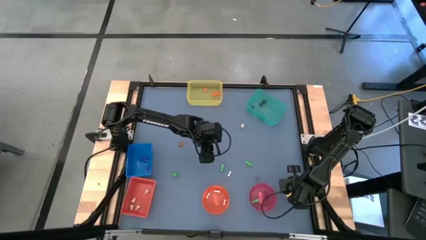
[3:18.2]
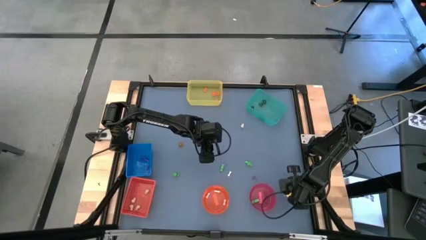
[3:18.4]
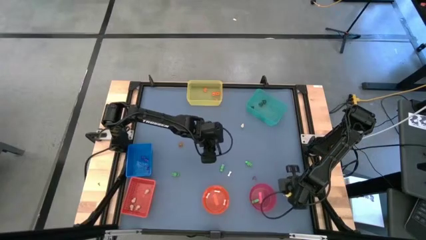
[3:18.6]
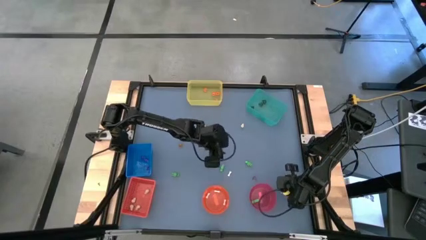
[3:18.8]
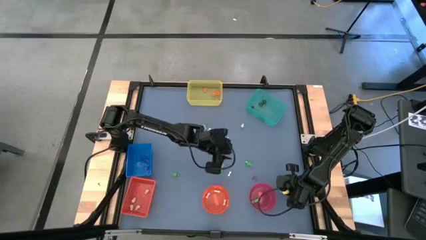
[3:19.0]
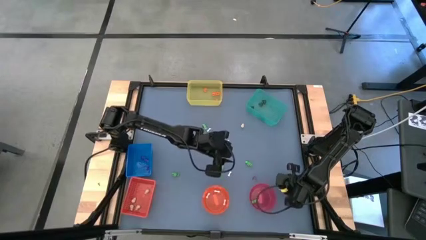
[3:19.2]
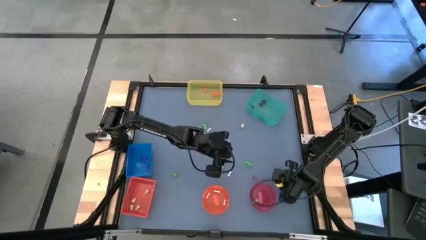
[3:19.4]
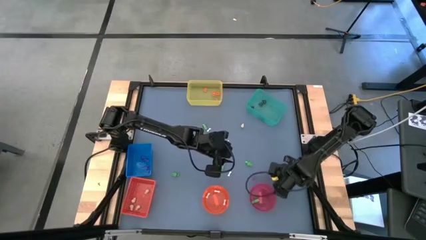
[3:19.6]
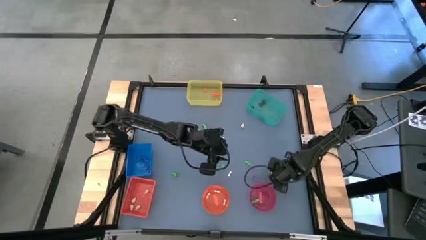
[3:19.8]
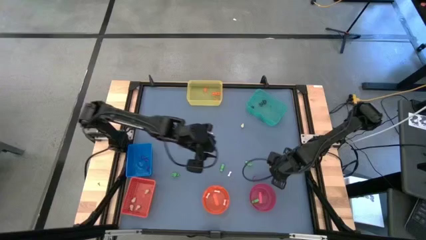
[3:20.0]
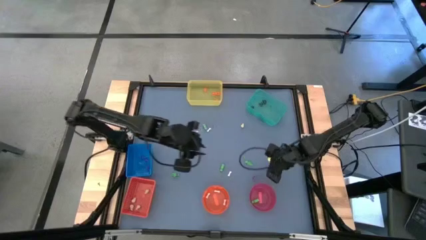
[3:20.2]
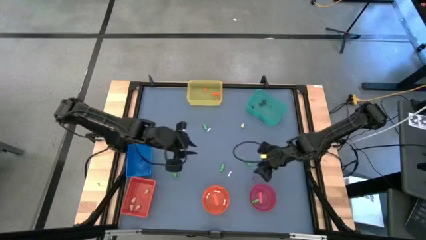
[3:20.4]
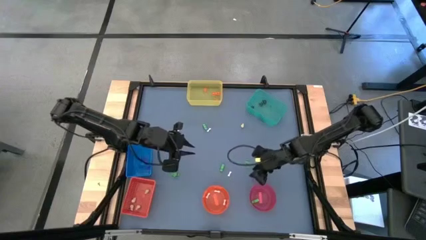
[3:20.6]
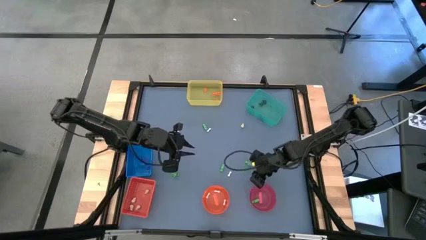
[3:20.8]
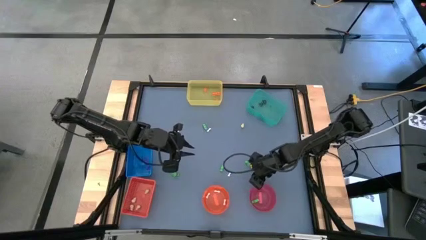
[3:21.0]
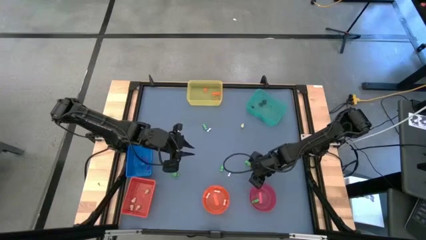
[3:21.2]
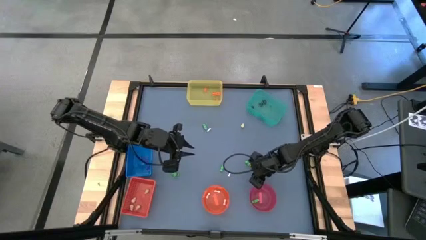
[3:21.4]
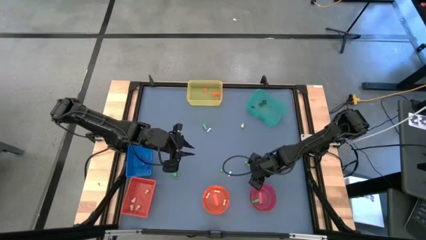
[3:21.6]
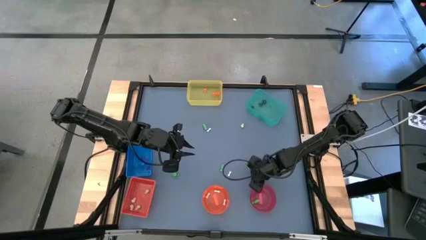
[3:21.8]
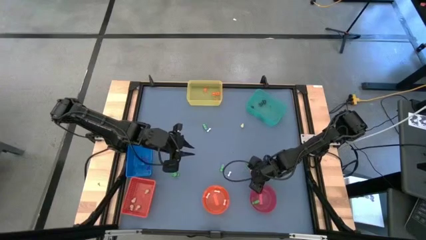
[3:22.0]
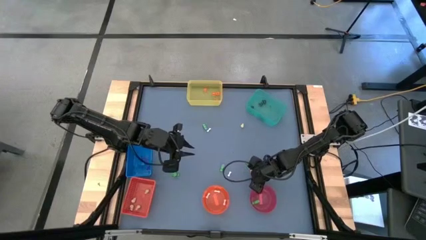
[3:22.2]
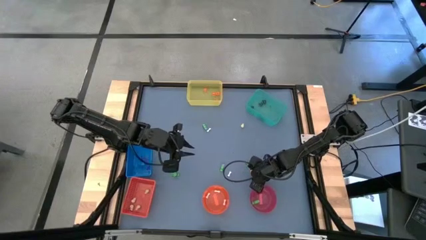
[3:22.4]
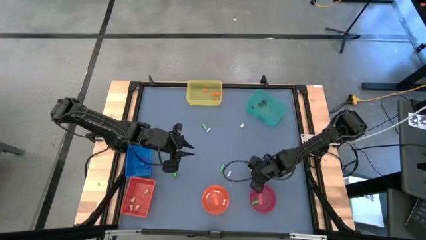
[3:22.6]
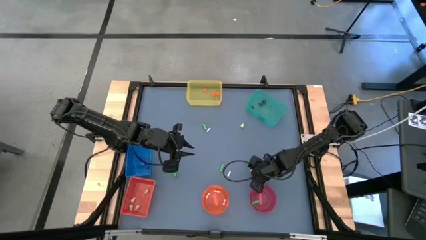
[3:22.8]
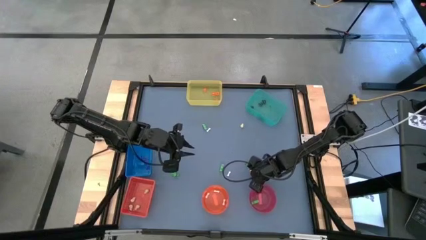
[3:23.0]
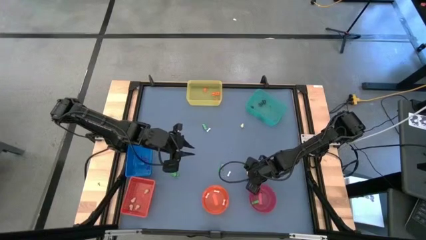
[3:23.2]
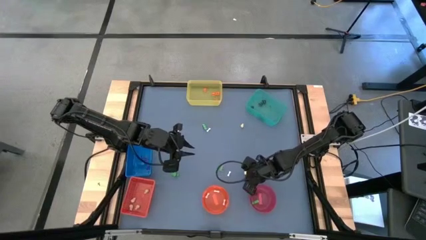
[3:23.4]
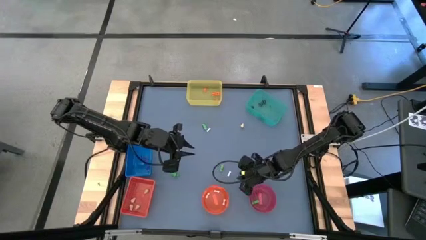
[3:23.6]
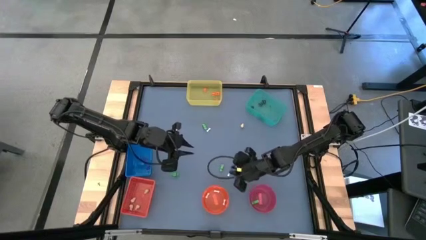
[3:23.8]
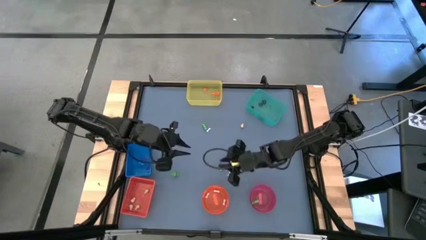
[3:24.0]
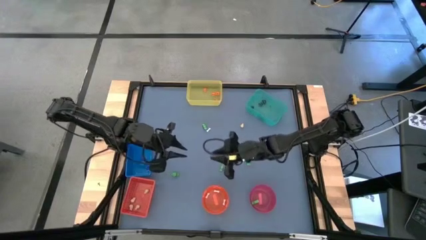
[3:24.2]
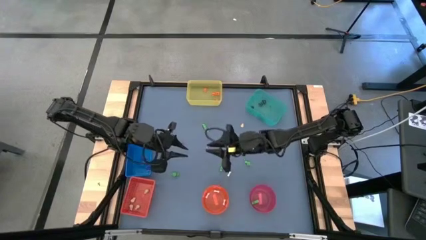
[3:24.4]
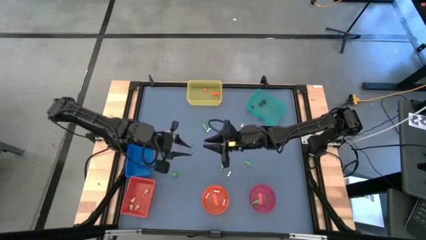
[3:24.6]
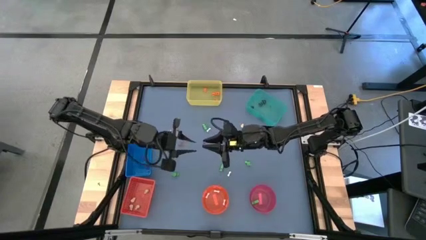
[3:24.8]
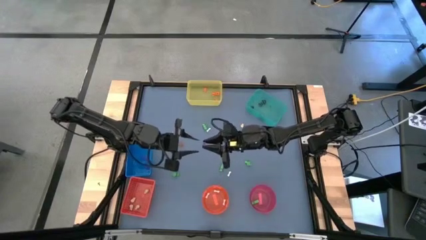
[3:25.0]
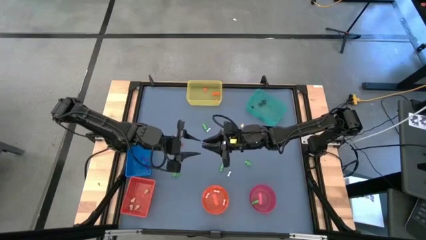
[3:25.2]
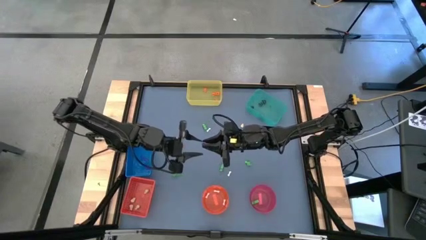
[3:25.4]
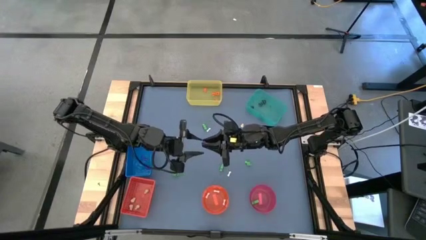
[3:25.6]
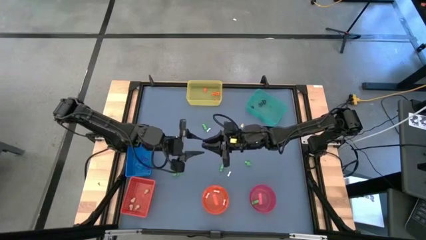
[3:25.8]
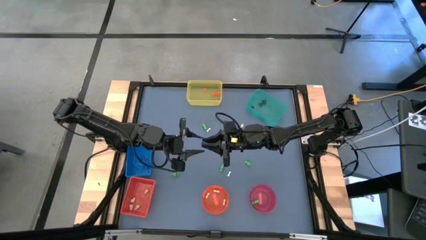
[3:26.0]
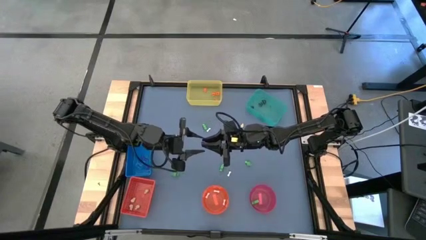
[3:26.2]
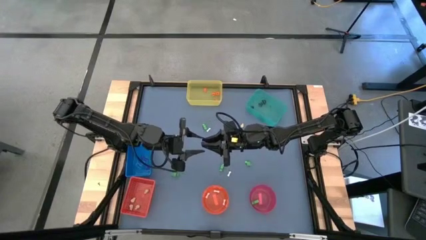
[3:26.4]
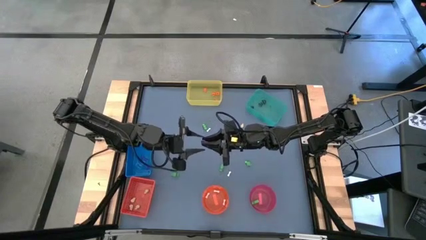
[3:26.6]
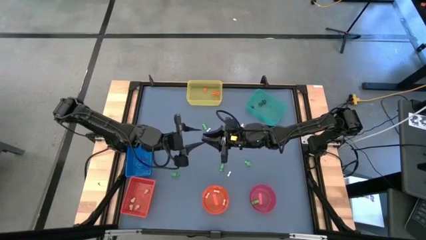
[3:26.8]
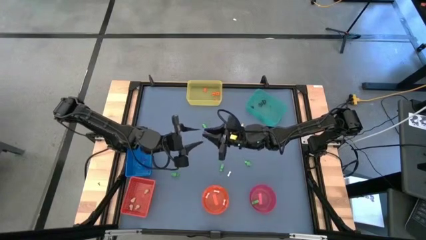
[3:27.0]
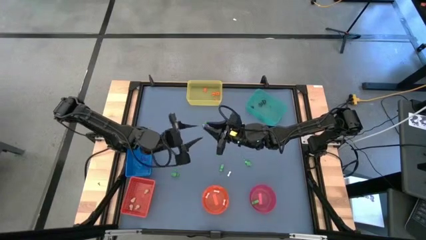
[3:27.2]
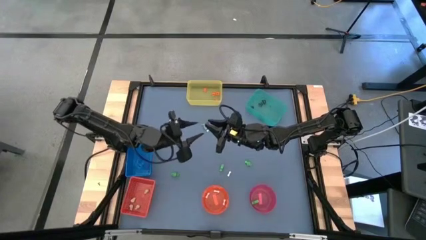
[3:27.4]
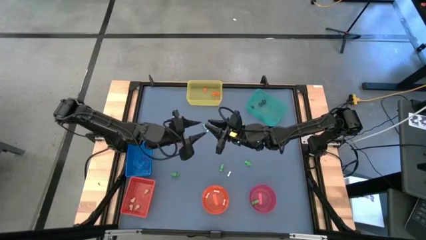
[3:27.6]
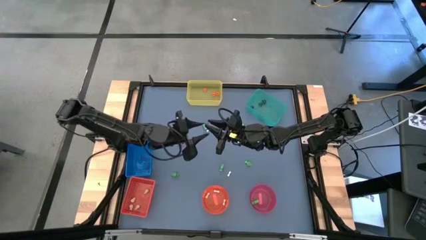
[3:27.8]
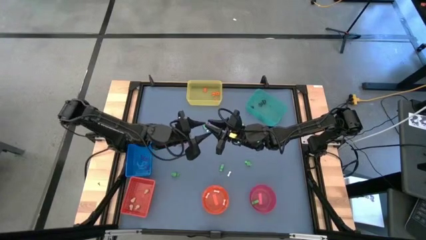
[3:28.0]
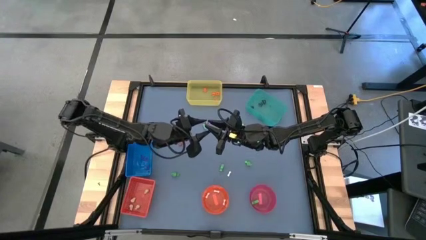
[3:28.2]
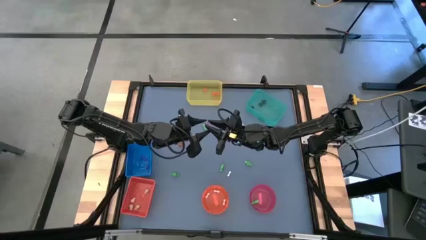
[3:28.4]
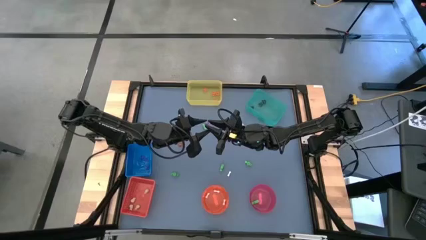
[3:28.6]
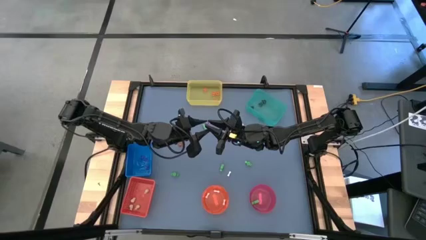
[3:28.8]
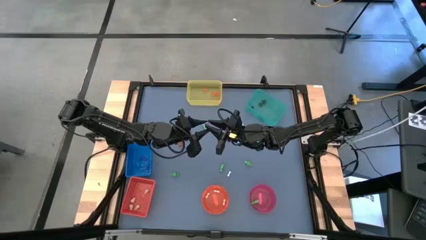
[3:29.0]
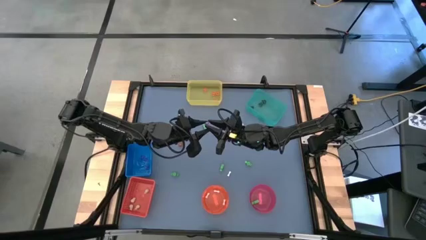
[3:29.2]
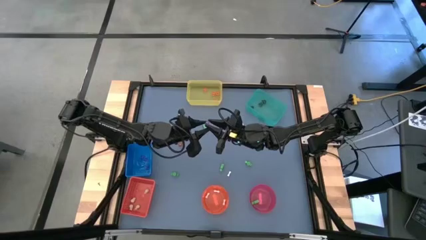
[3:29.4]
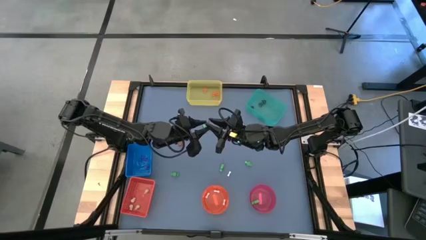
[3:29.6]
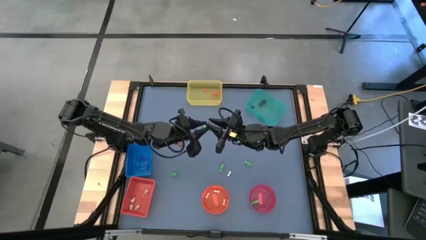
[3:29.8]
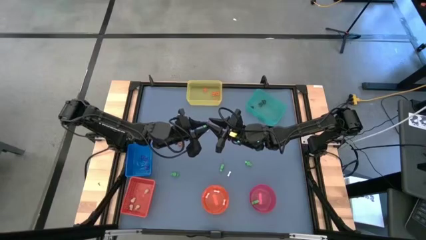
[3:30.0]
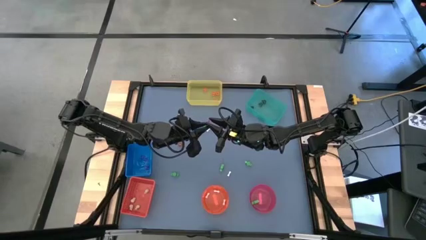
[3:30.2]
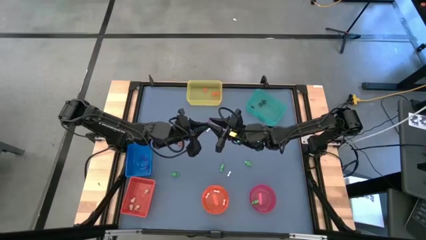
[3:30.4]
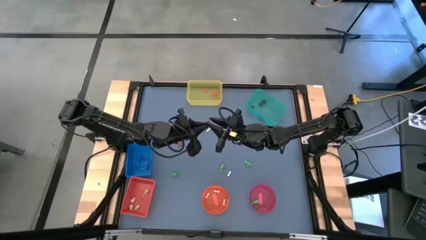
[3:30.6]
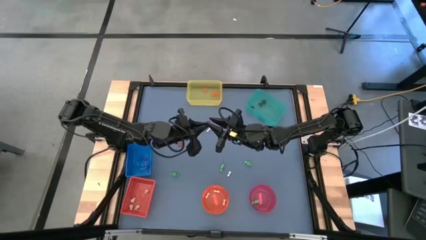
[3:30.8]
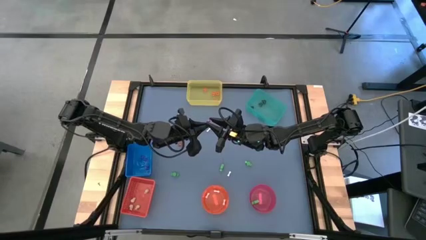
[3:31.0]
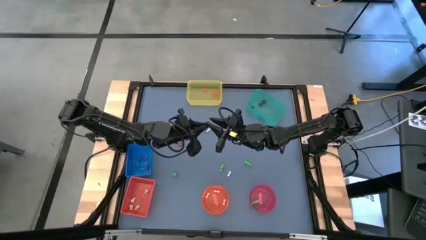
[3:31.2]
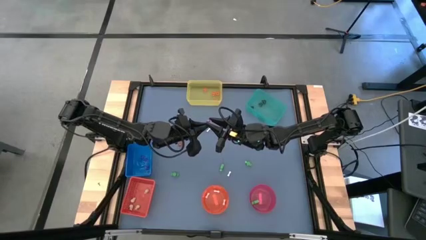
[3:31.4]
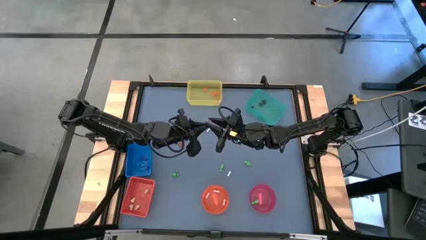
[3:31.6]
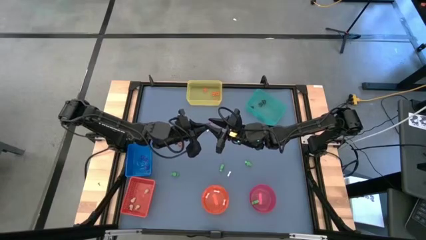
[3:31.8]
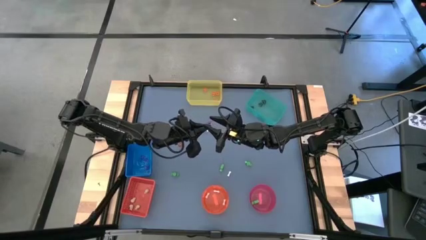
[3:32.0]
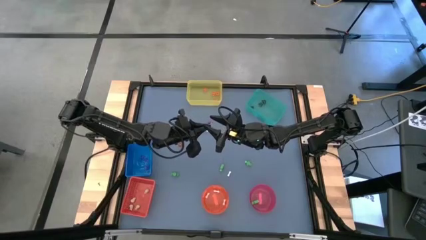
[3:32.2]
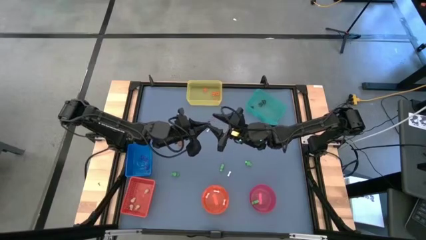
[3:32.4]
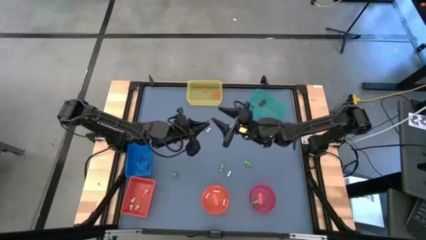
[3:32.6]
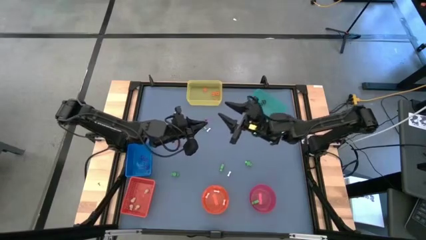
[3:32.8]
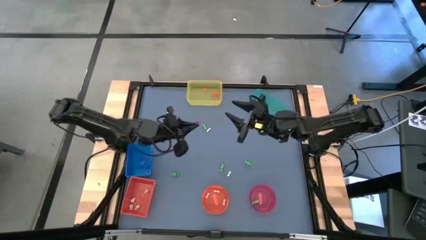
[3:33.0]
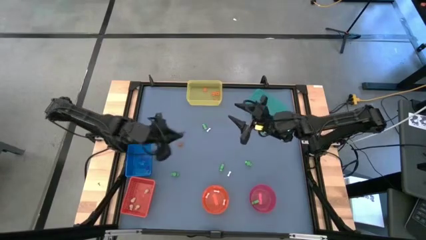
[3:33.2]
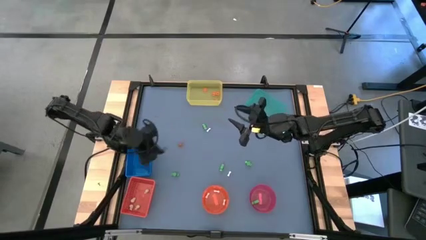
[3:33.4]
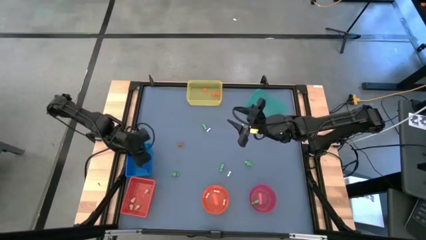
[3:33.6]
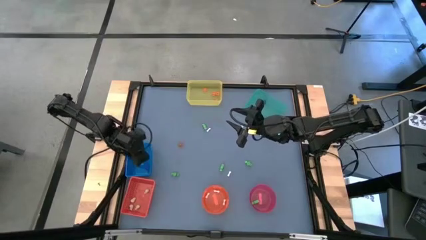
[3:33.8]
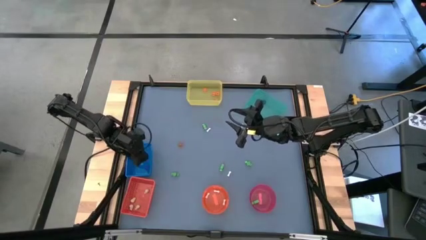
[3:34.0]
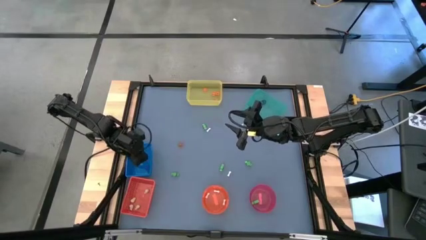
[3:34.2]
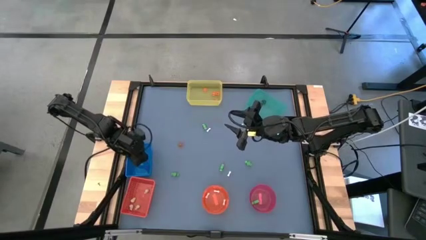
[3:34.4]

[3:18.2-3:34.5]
Task: Sort Halloween decoration
Put the purple witch hat toy into the blue bin
